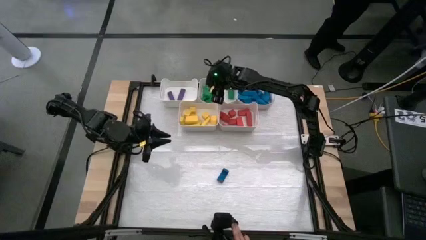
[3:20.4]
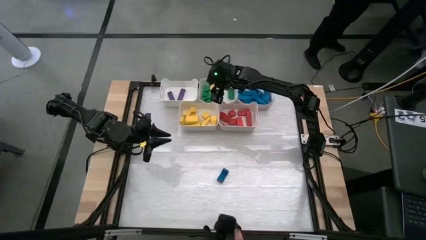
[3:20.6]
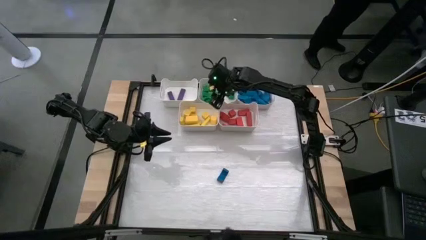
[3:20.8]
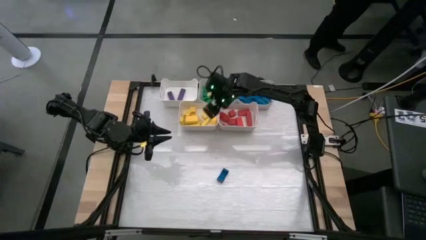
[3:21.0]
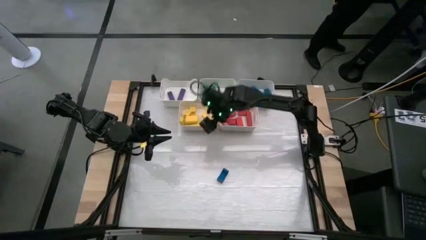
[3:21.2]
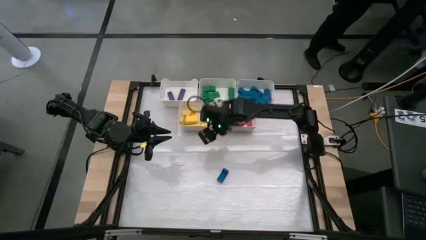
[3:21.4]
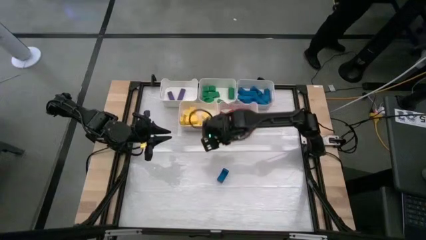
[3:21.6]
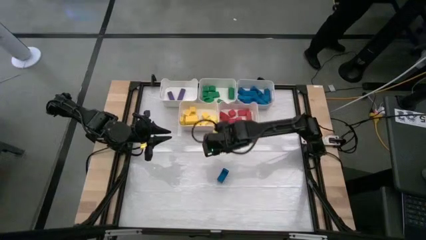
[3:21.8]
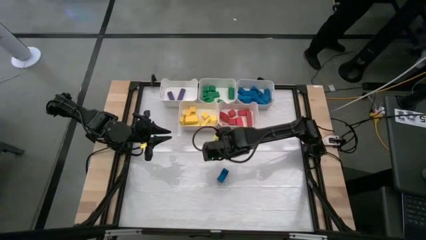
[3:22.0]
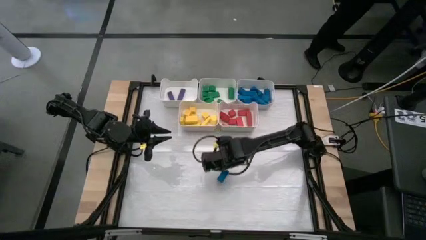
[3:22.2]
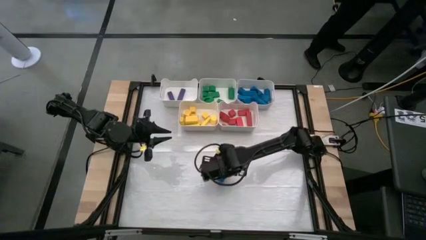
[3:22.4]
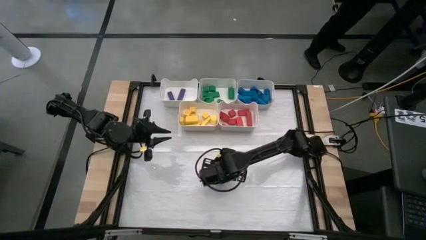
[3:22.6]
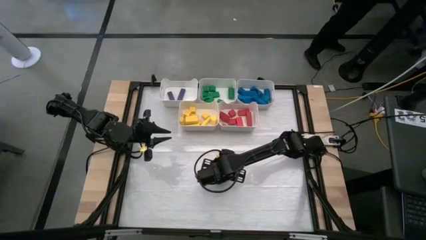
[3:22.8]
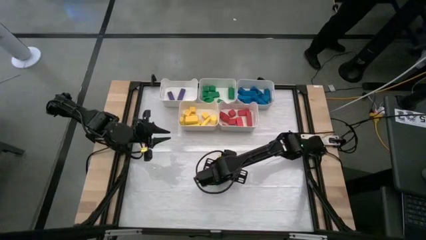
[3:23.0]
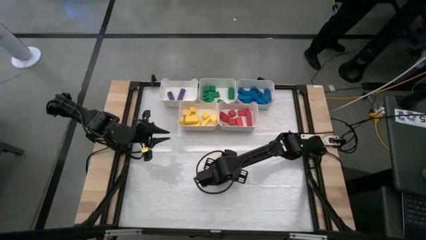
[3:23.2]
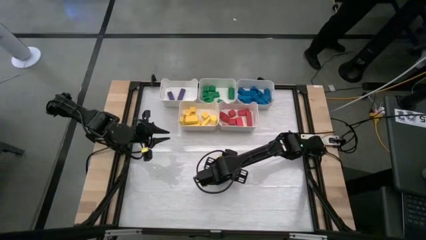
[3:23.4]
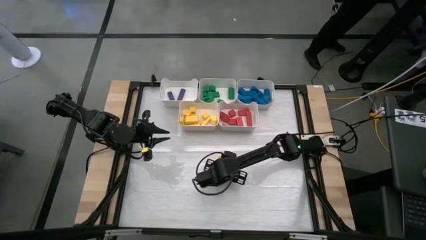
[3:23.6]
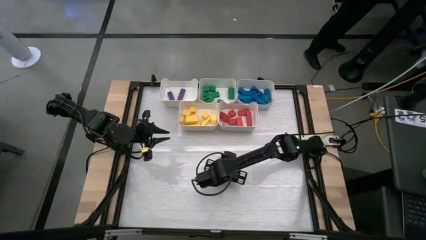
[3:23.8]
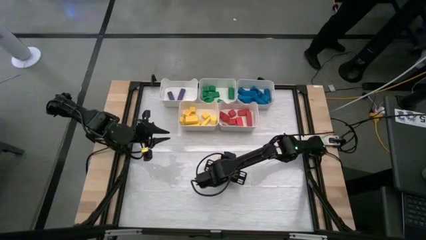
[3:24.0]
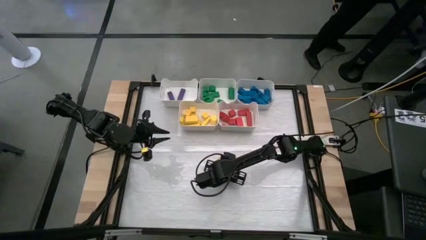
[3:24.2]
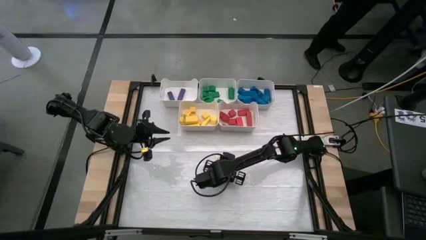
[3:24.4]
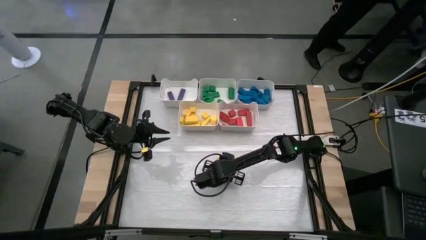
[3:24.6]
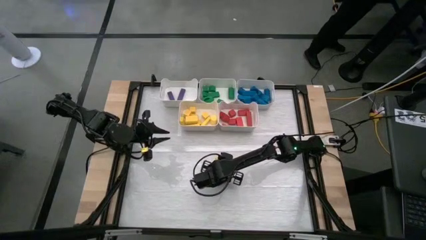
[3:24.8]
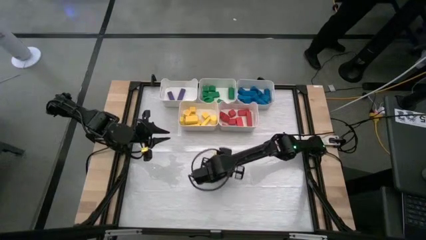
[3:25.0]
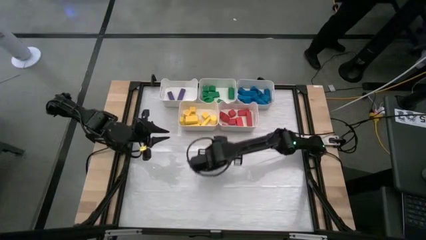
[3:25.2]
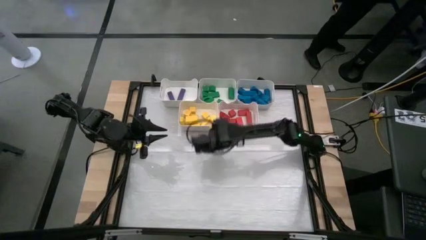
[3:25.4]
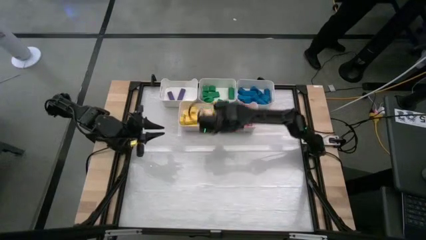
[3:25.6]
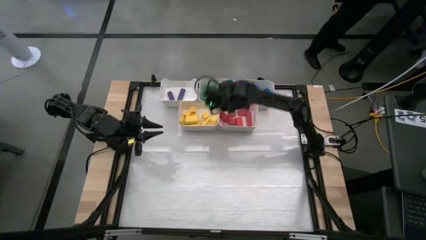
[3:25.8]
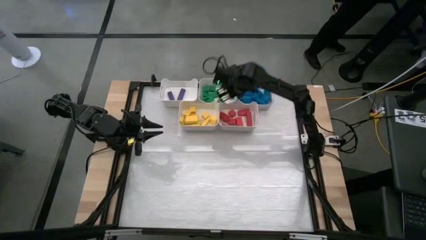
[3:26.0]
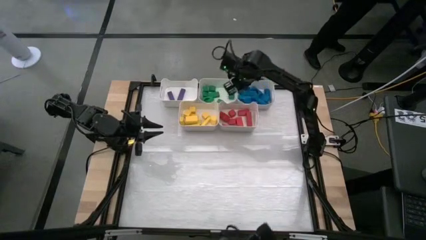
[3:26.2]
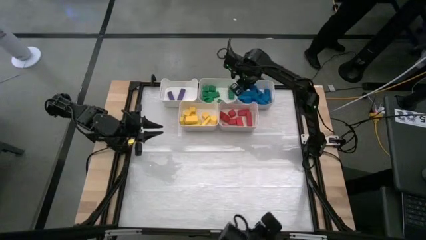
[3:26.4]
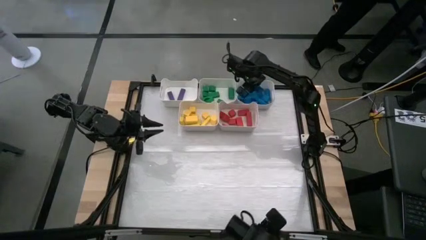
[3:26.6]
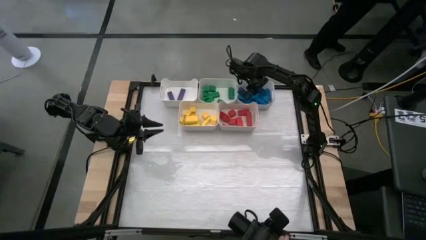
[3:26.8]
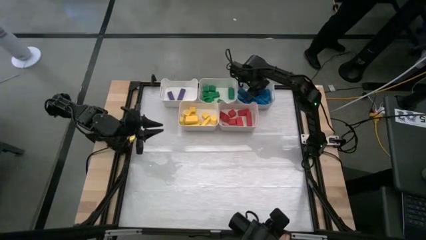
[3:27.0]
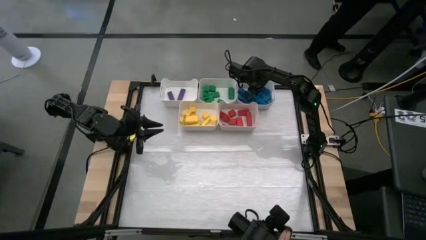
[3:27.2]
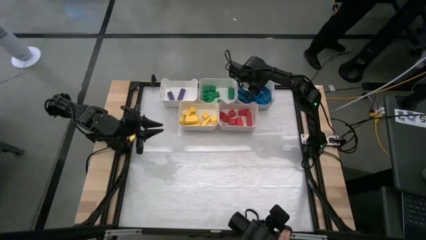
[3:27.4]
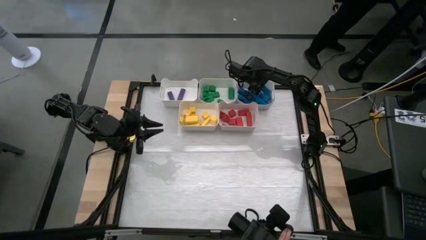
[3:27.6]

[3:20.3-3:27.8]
Task: Sort blocks
Put the blue block into the top right bin

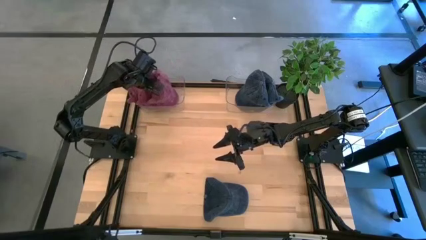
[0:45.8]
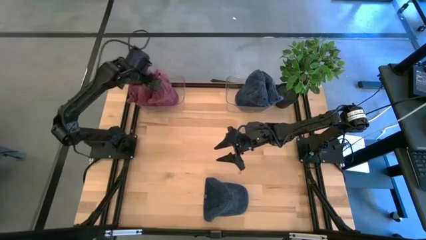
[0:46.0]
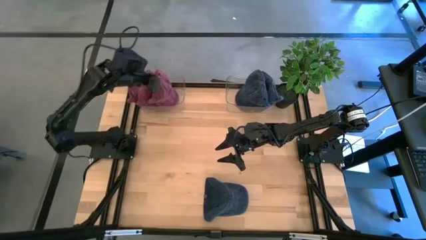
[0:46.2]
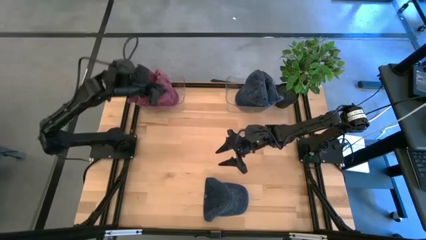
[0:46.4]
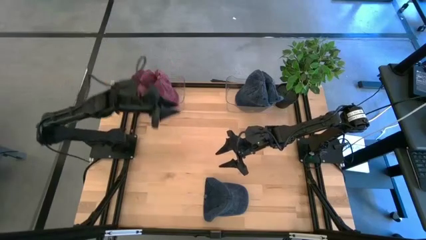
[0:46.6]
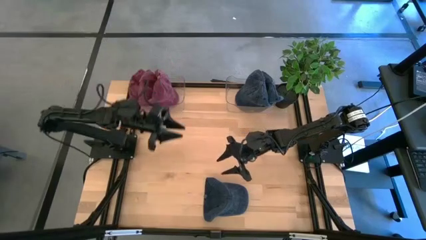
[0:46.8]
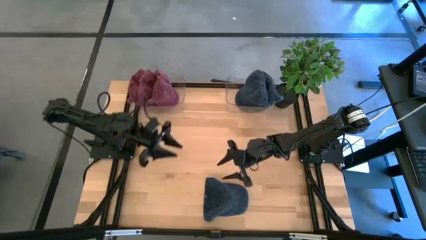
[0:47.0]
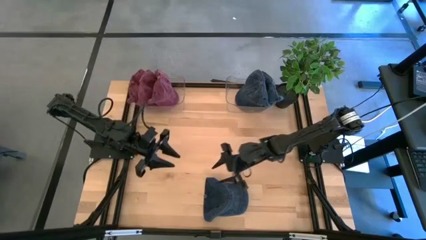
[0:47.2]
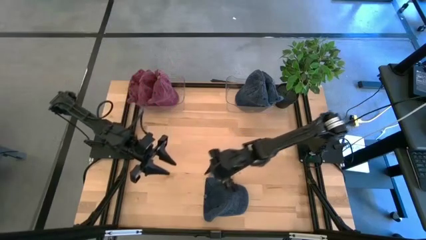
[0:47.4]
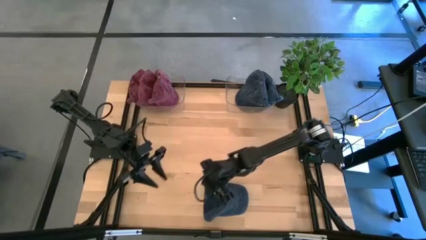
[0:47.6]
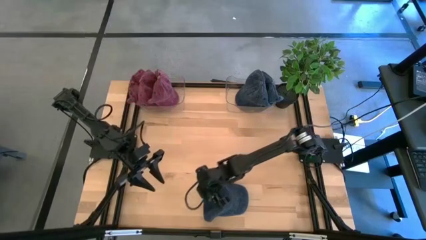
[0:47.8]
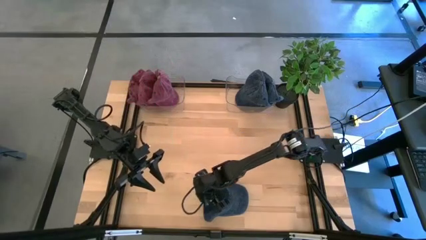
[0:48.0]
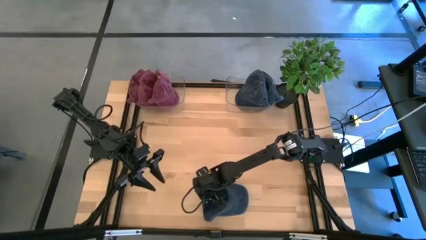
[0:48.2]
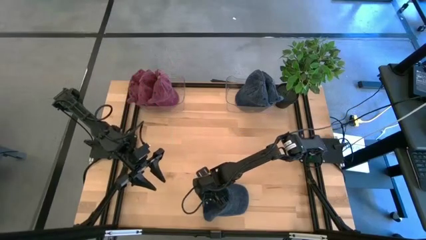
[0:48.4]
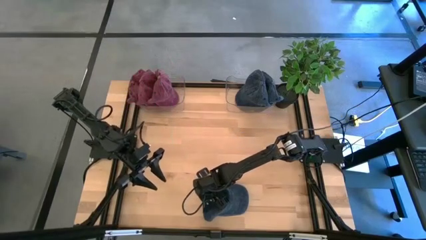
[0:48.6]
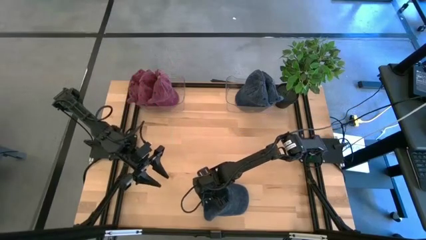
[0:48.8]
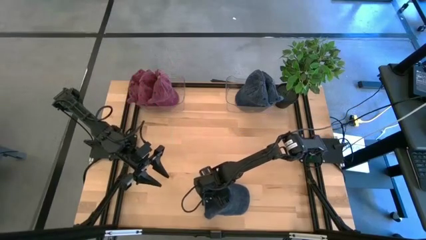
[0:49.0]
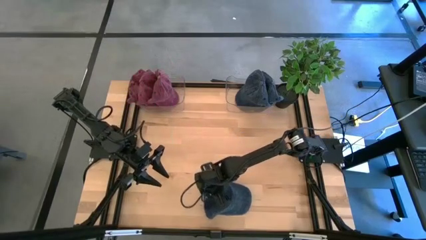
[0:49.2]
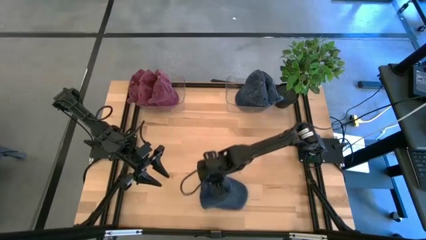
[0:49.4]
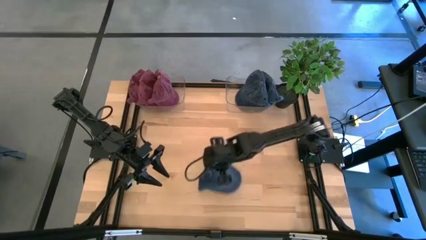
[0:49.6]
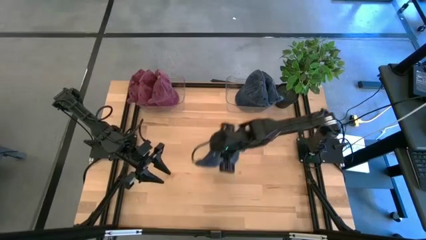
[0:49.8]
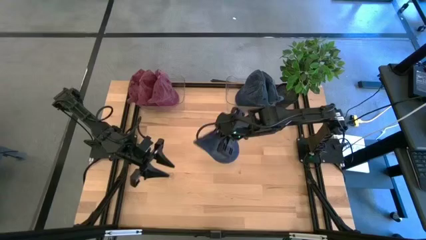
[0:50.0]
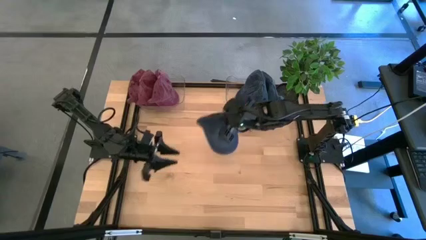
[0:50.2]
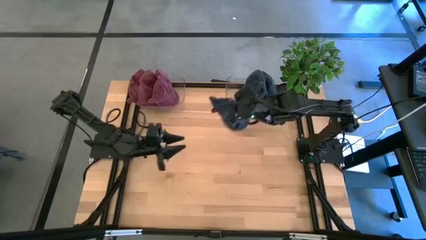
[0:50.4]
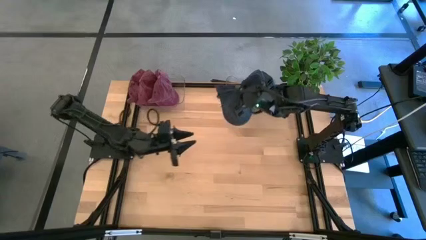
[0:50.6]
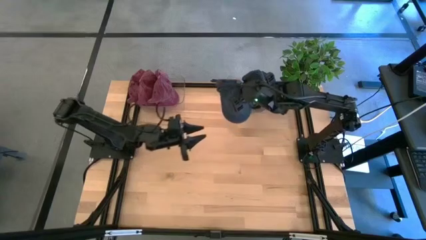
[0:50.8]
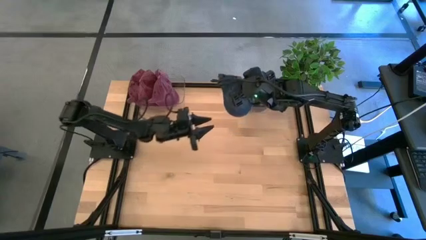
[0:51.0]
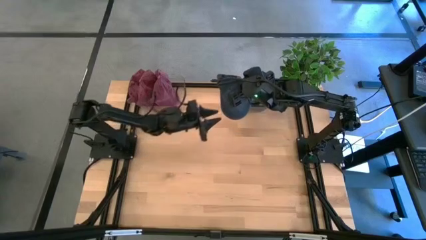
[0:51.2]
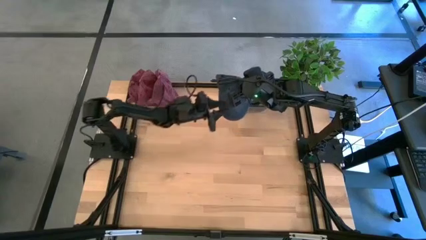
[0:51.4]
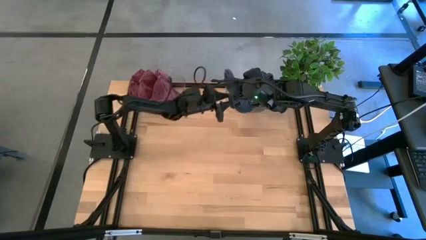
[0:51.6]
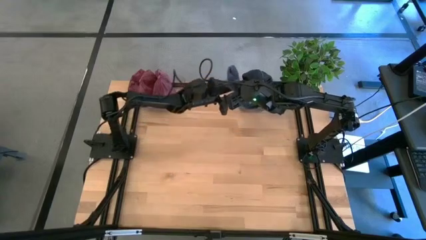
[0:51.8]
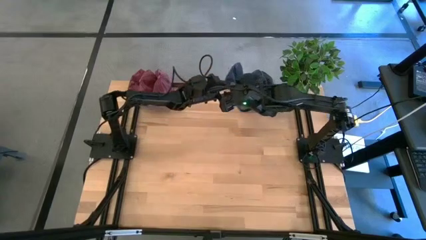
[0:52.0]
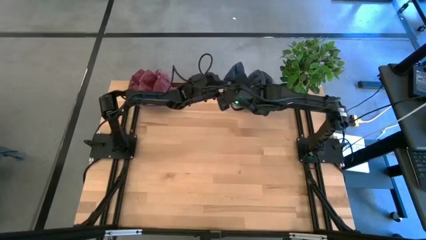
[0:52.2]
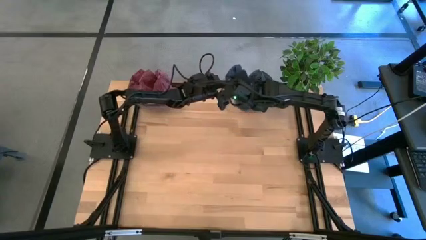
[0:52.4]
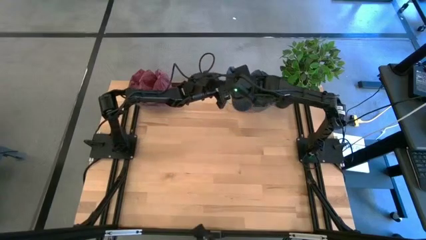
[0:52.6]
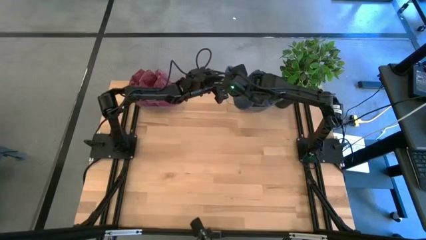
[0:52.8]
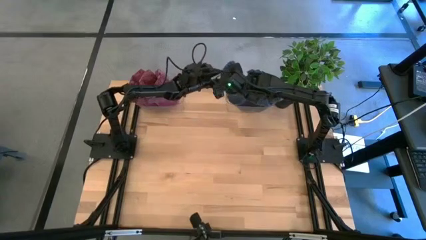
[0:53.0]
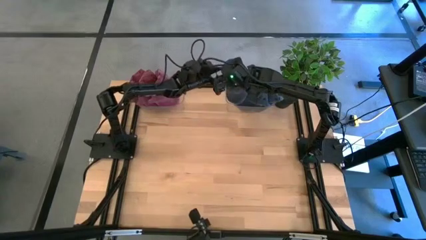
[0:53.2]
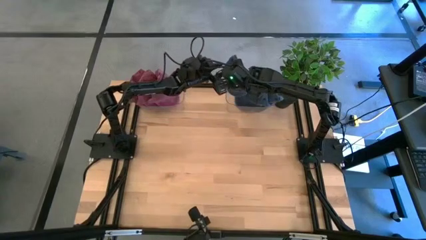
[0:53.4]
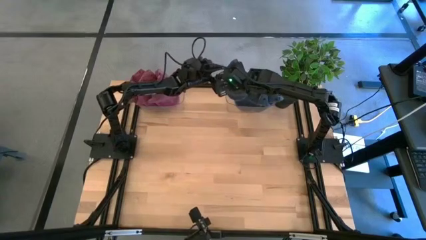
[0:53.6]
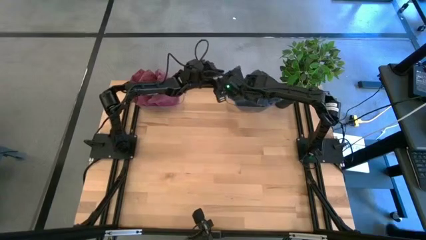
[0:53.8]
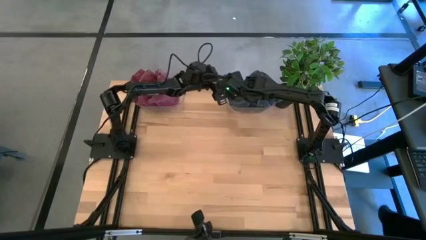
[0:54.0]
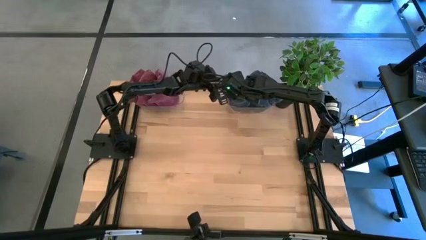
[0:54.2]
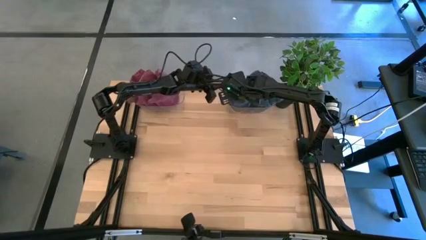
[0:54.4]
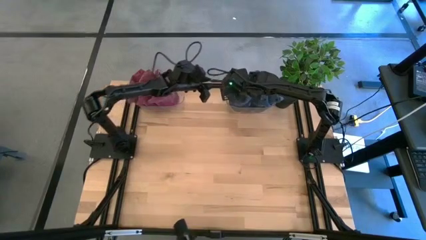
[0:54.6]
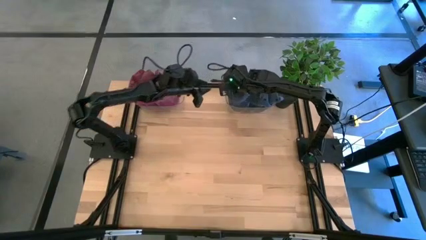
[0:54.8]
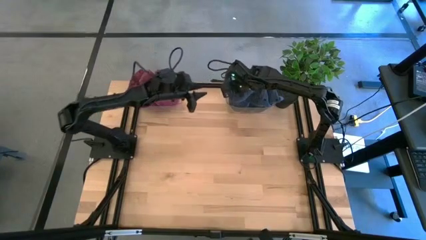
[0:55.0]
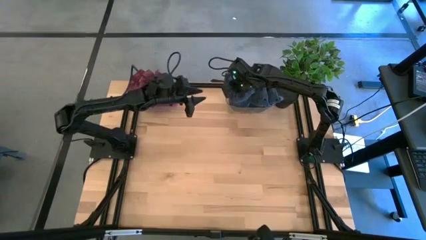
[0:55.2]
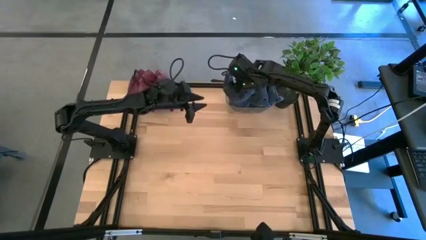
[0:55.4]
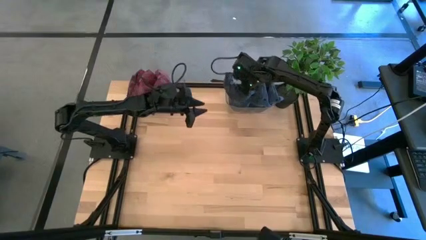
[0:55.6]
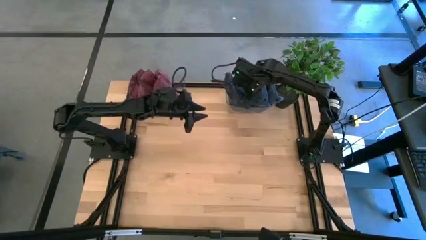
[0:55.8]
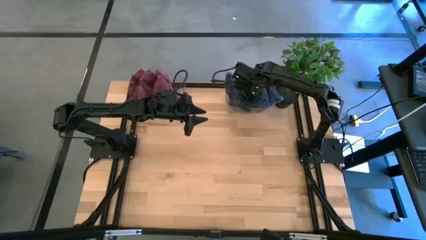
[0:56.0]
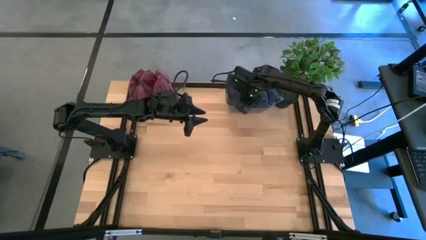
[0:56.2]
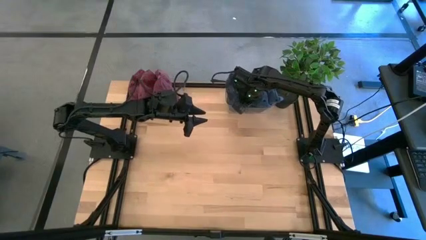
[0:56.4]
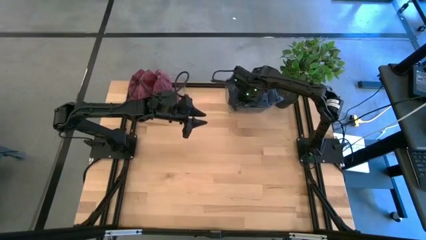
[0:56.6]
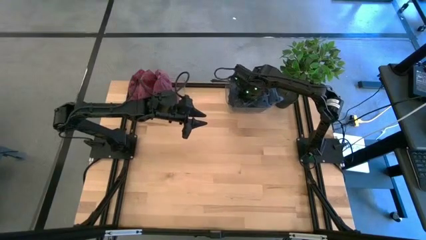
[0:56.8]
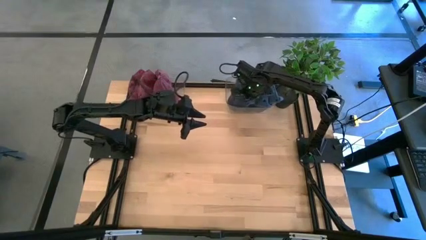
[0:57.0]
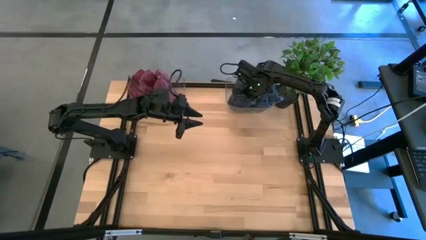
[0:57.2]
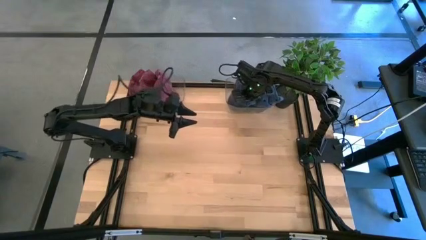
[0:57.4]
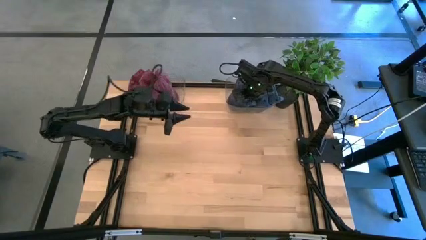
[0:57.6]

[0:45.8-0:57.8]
Task: Pick & Place hat
Put the blue cap into the right transparent bin
